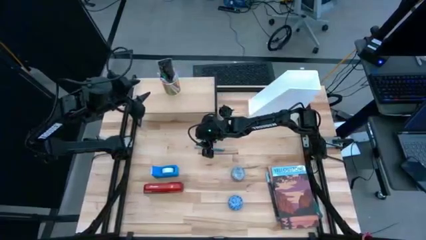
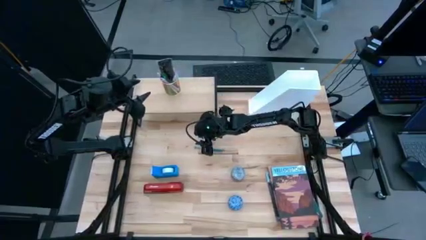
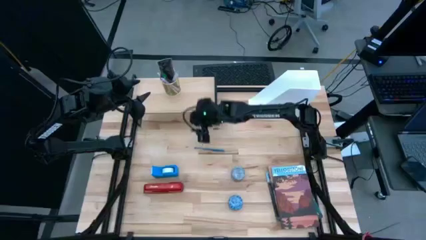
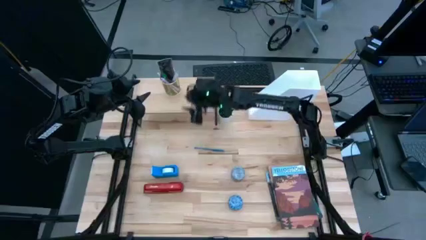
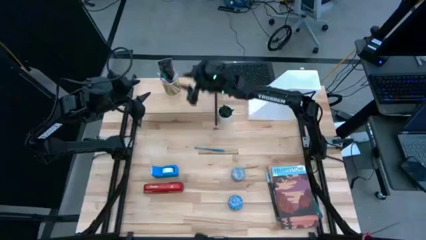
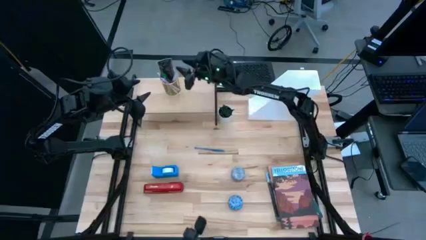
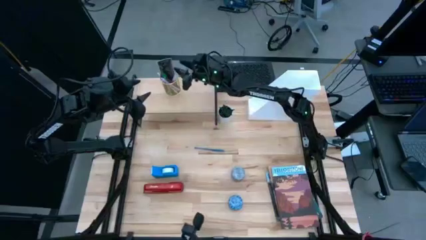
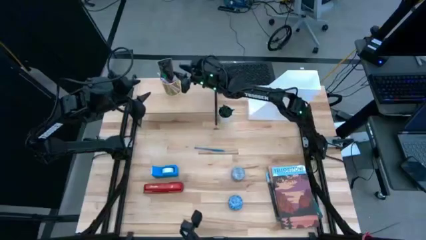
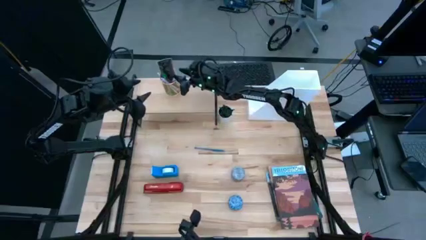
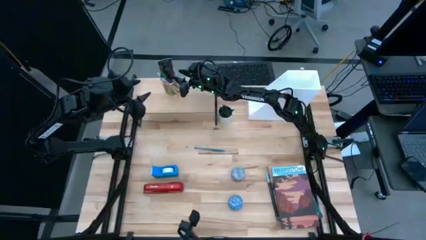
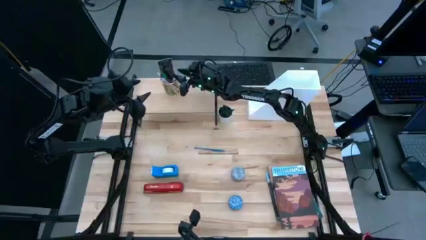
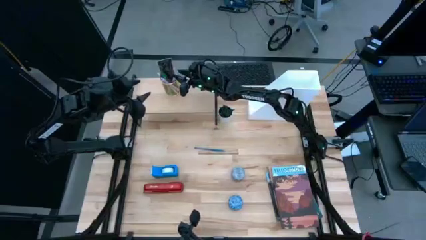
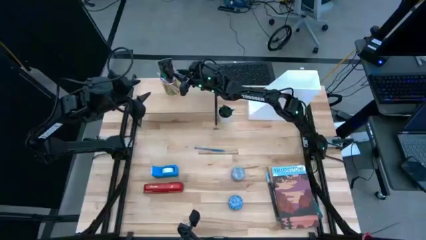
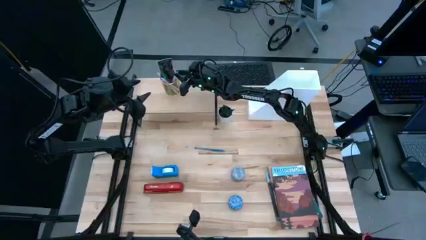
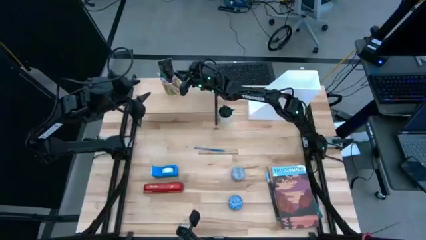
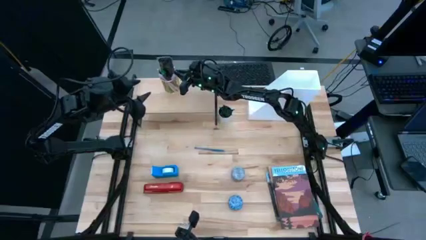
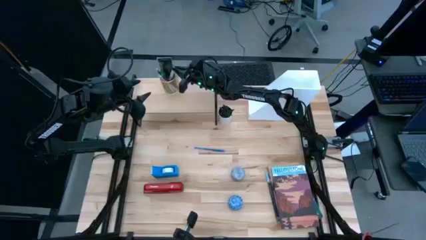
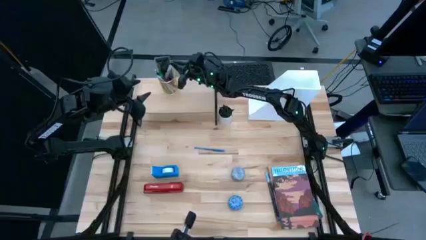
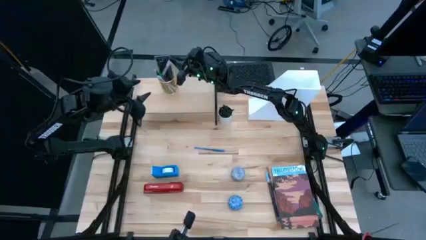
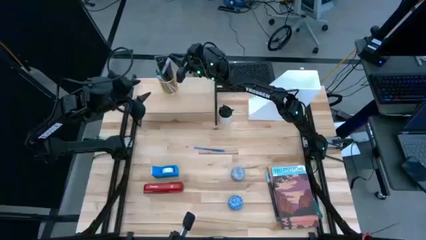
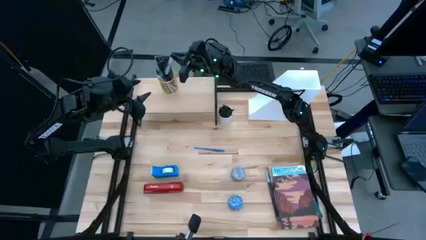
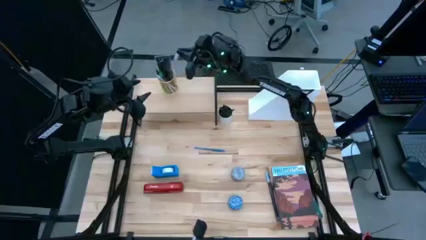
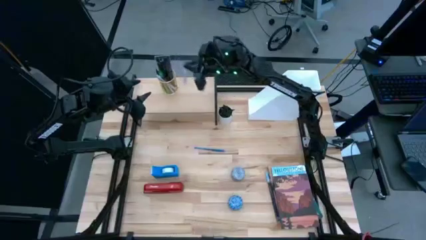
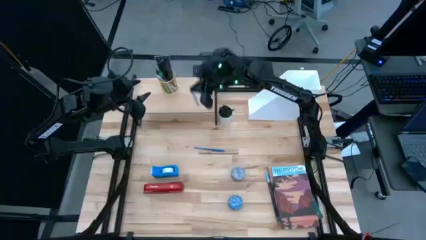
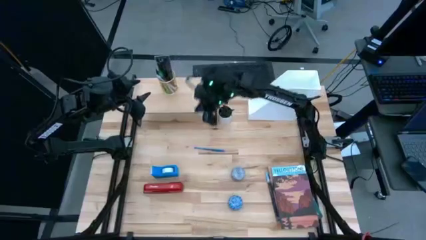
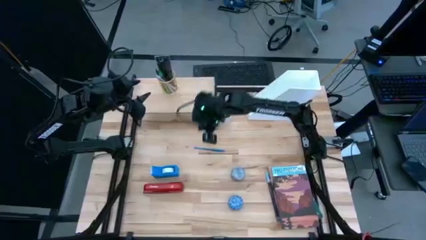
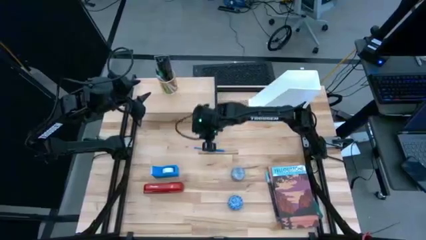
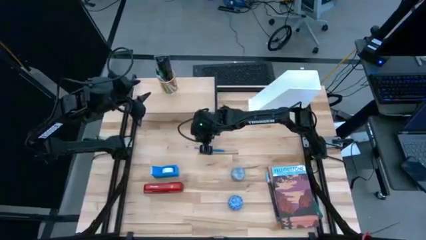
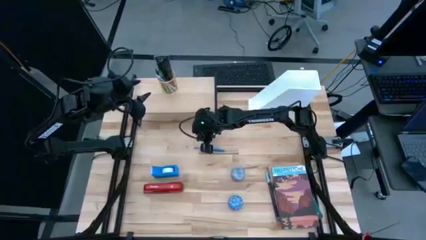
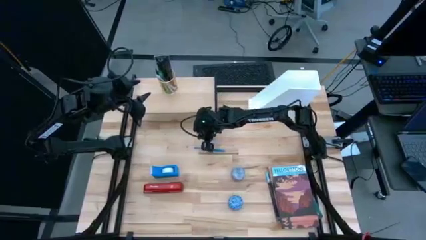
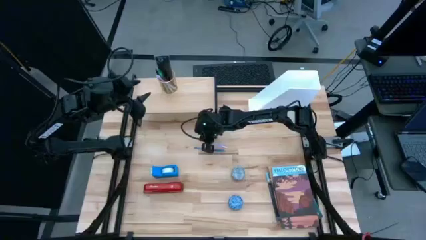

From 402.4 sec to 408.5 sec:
Task: Stock shelves
Remove the purple pen from the gold pen holder

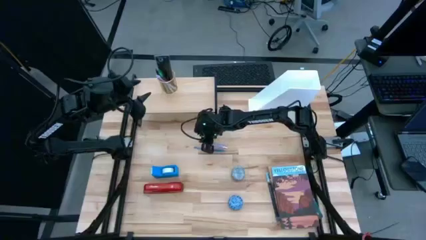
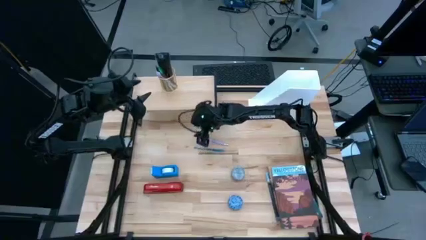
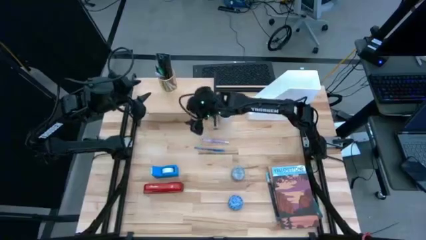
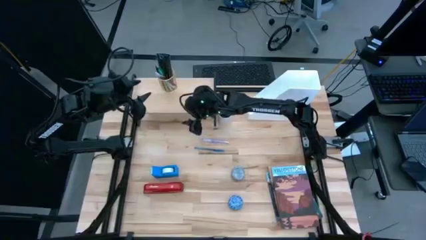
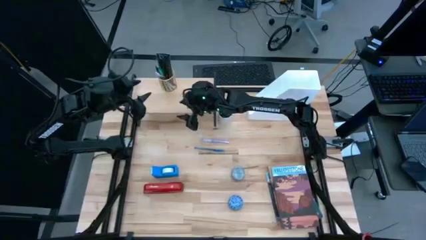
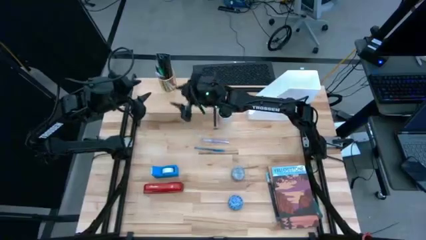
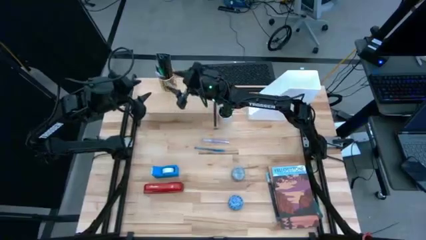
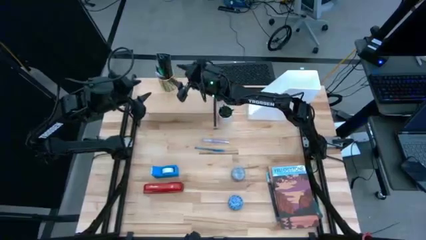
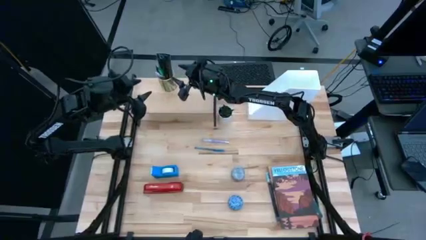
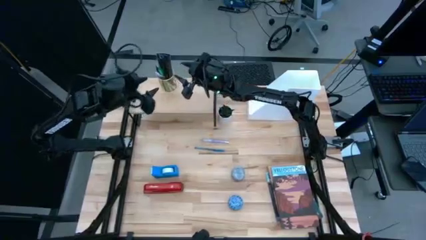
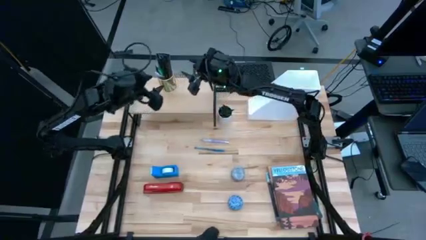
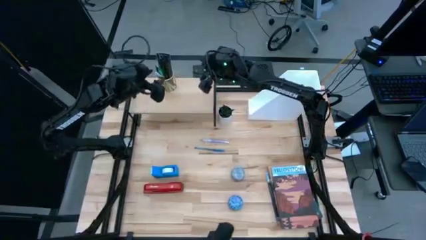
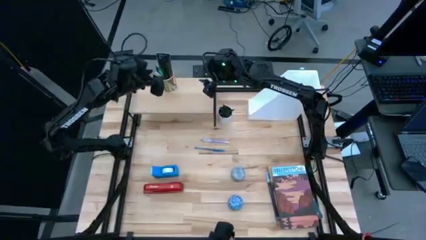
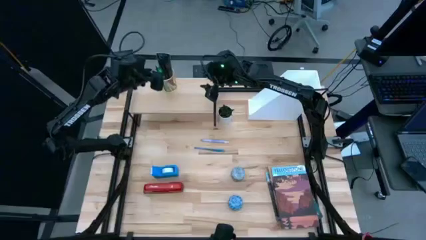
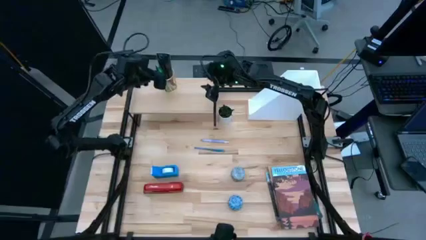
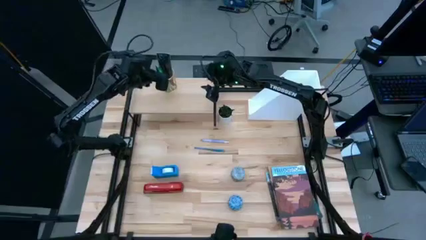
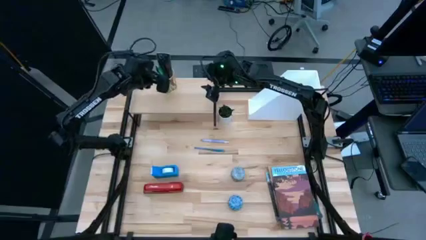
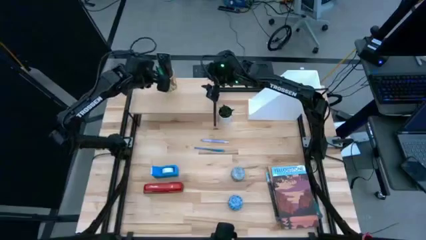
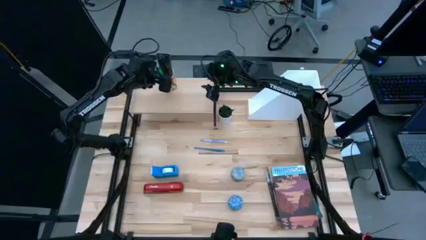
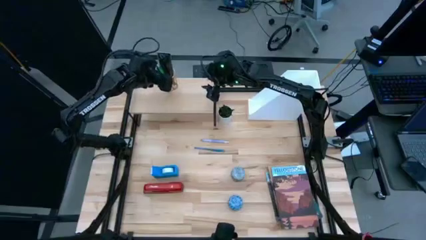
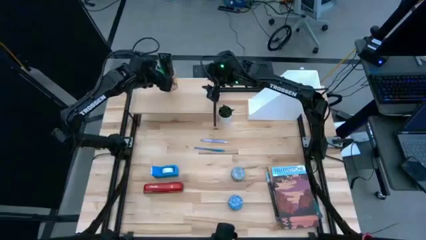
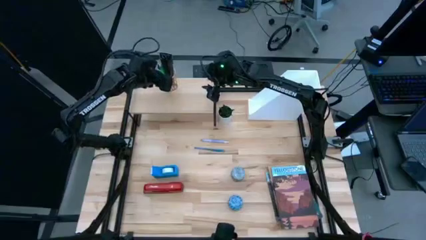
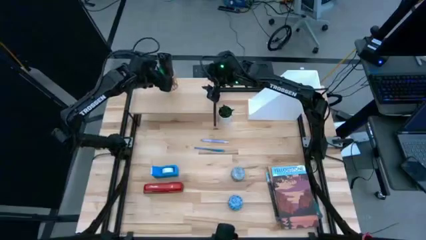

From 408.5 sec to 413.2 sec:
Remove the brown pen from the gold pen holder

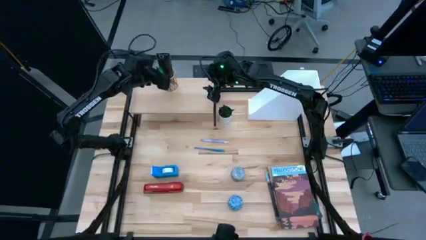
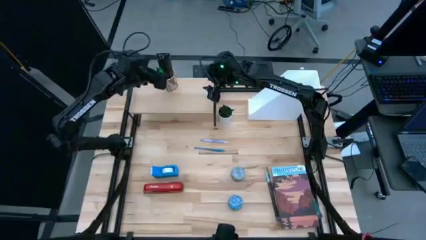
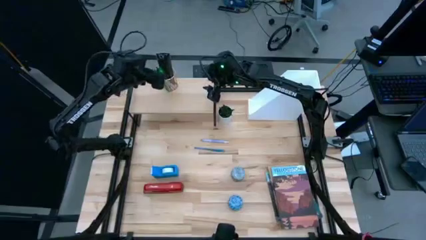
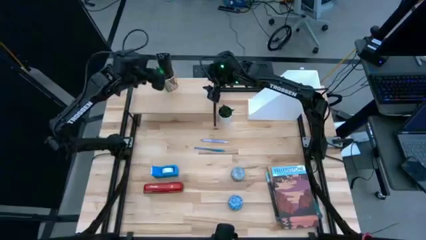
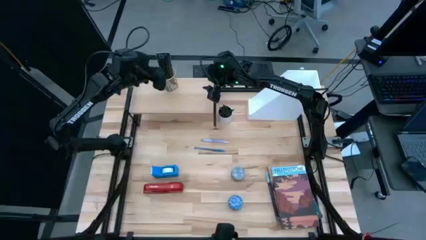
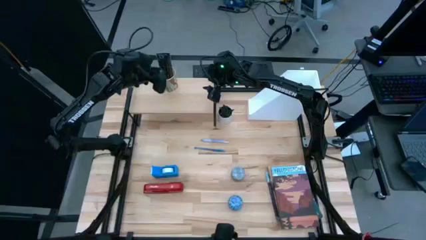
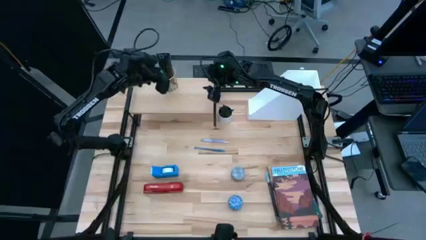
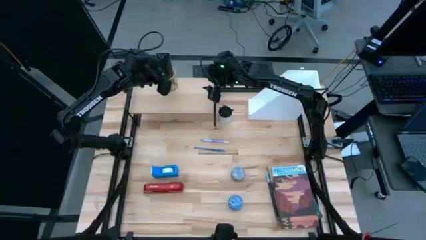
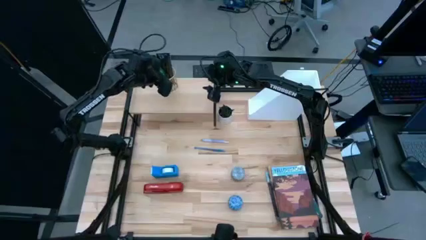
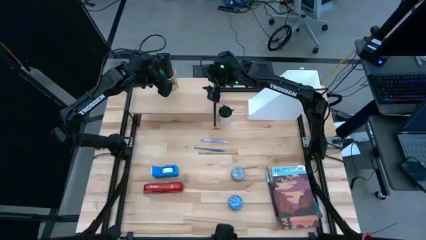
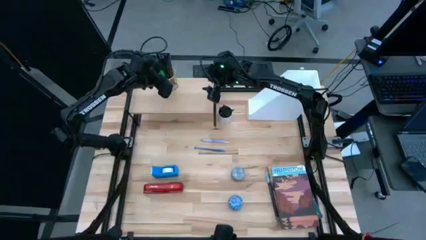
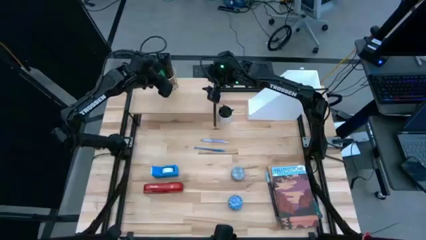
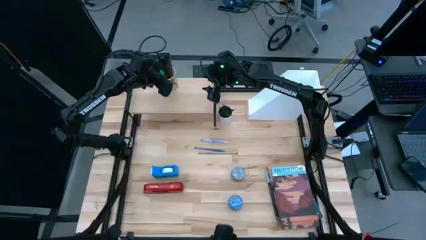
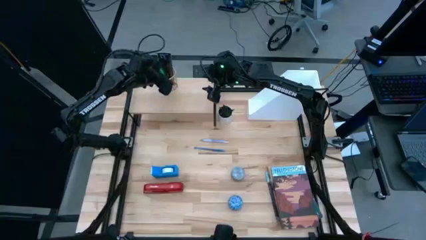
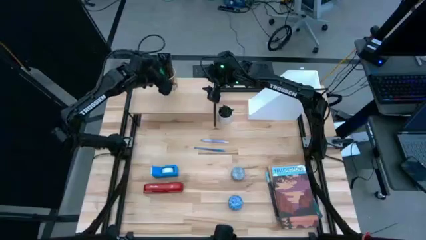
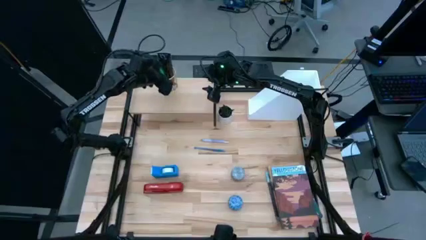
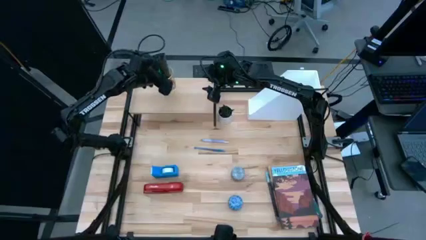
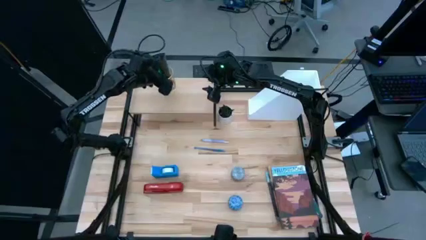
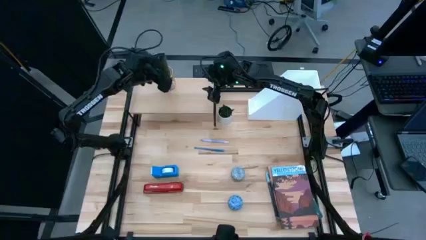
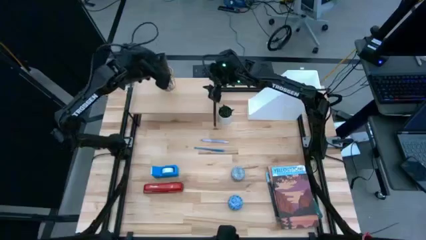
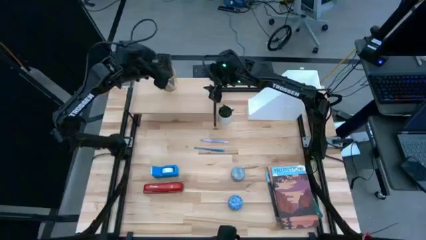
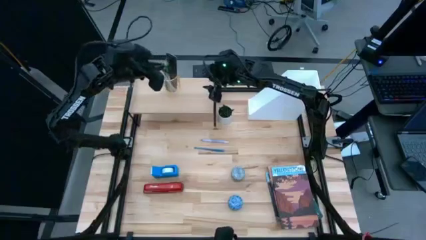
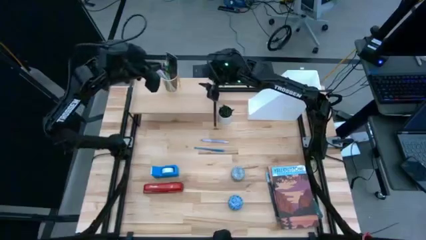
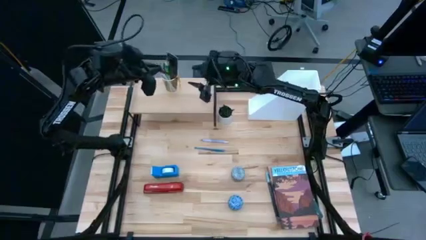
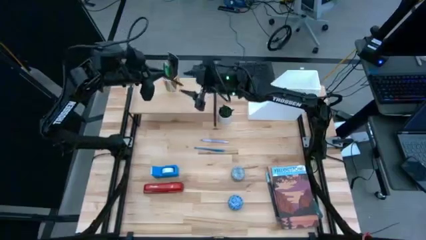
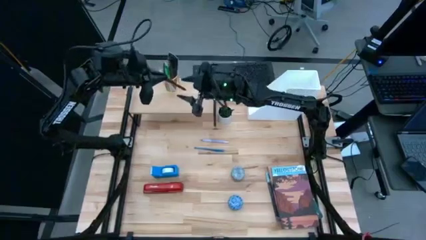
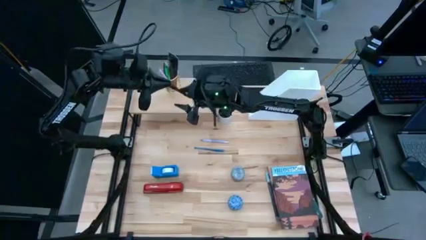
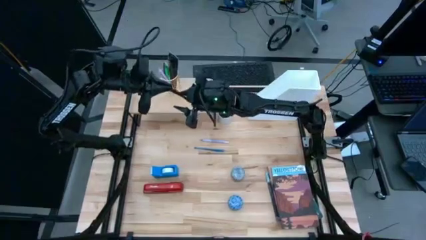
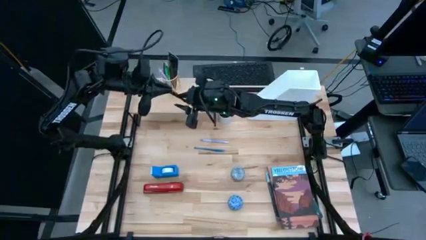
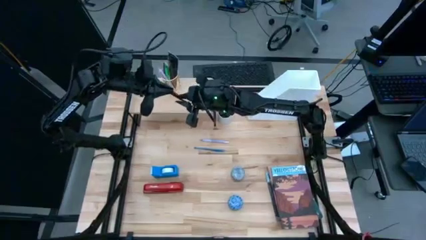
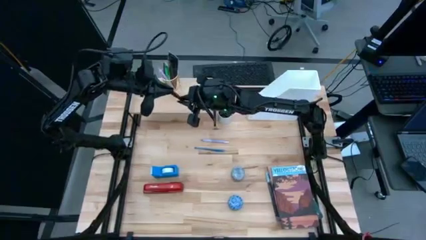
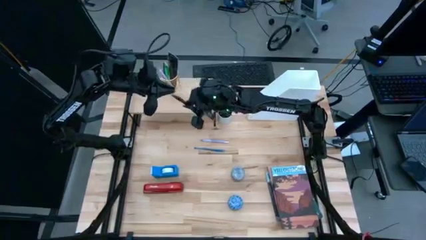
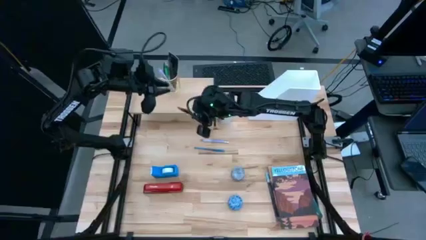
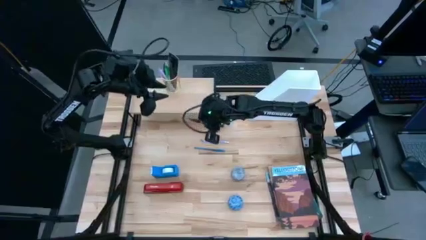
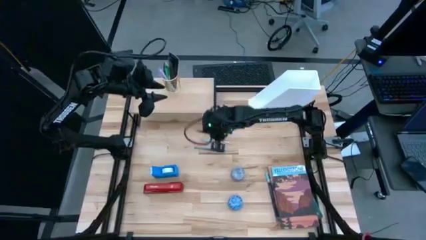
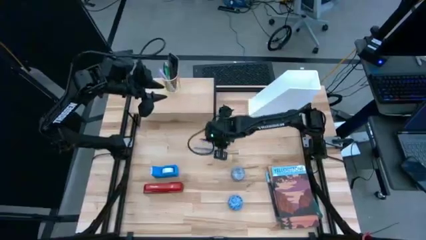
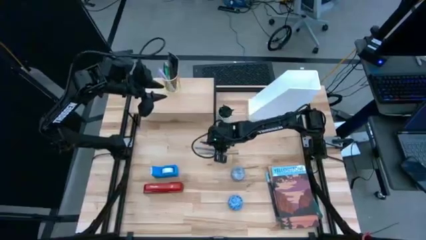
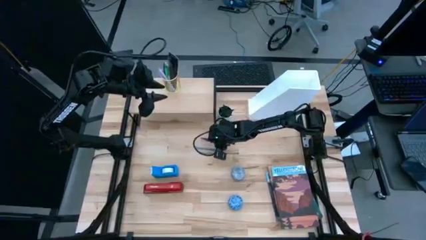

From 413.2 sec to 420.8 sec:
Remove the brown pen from the gold pen holder
